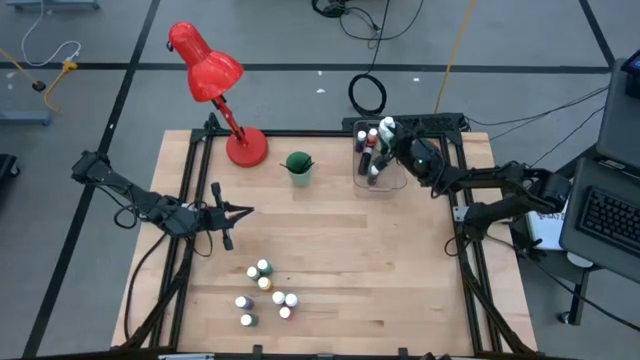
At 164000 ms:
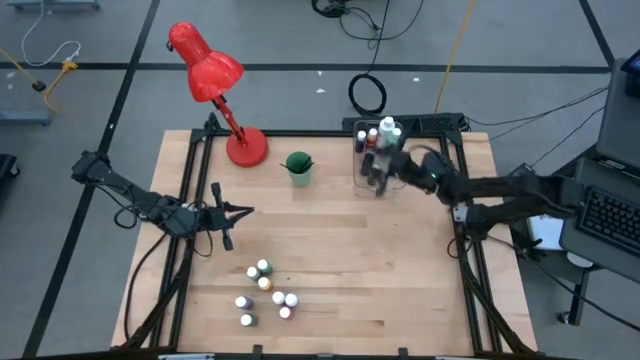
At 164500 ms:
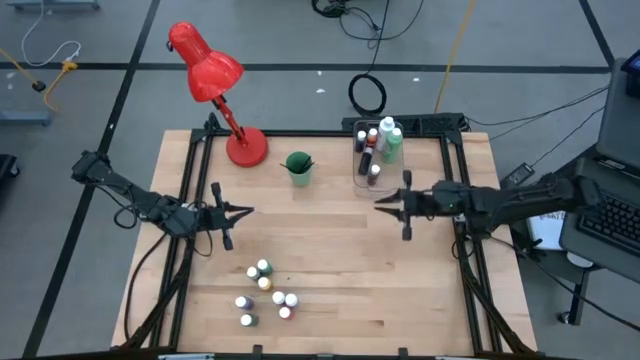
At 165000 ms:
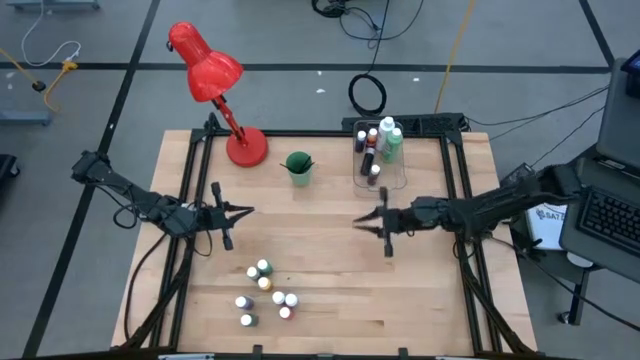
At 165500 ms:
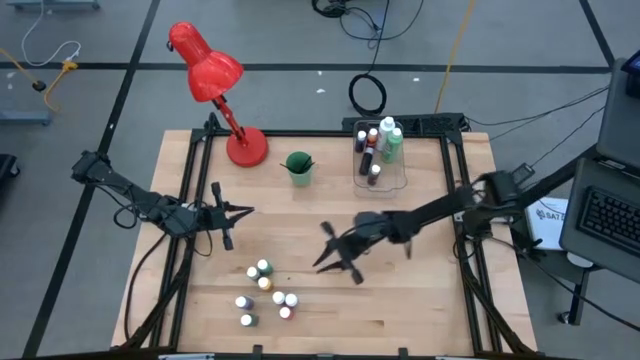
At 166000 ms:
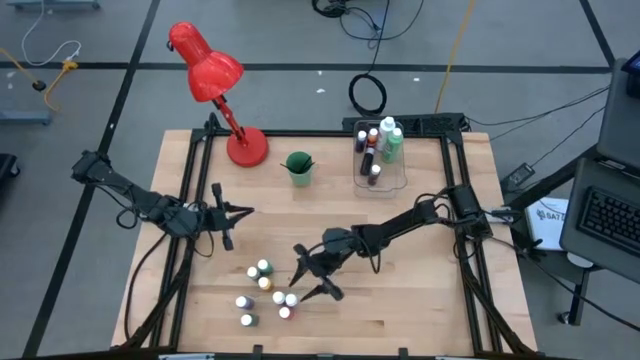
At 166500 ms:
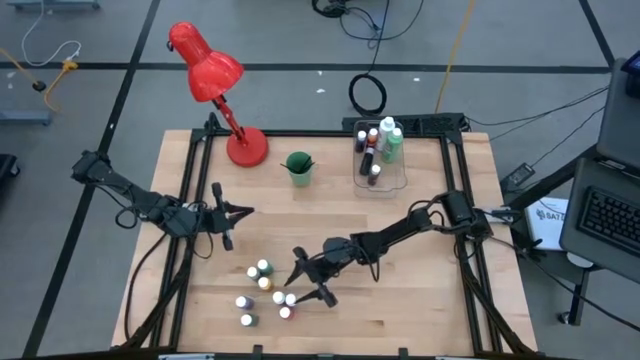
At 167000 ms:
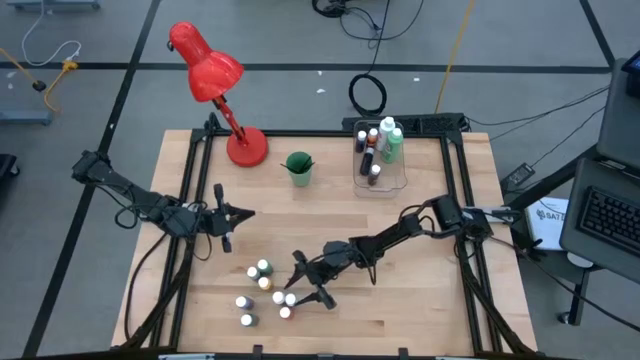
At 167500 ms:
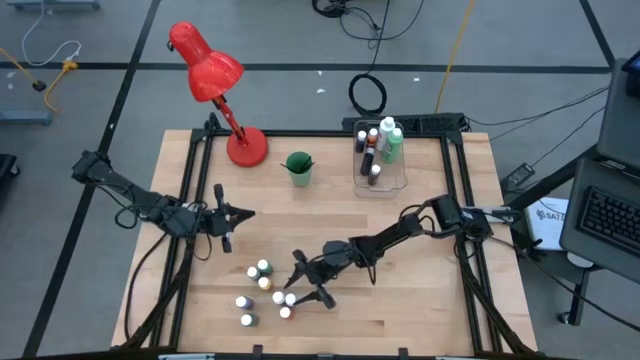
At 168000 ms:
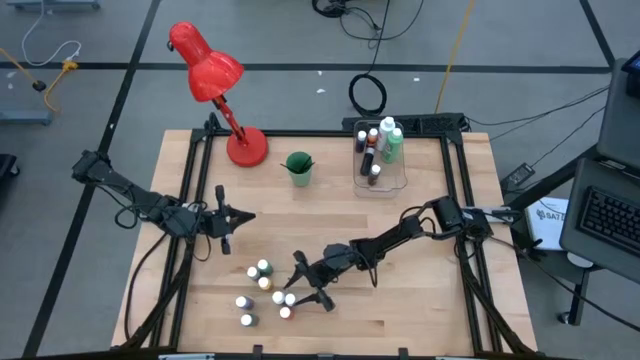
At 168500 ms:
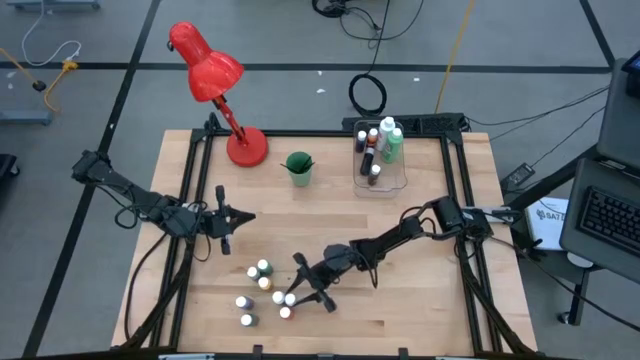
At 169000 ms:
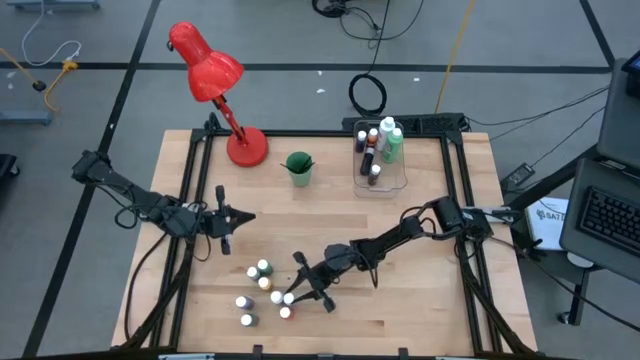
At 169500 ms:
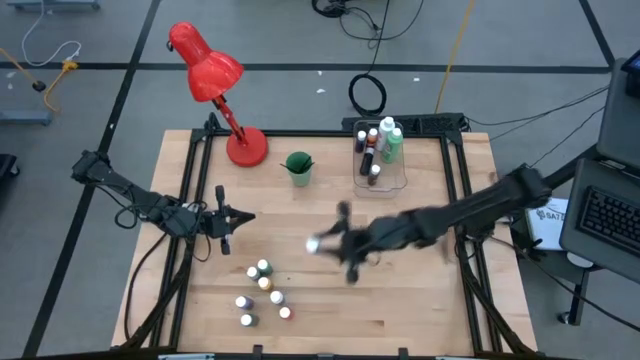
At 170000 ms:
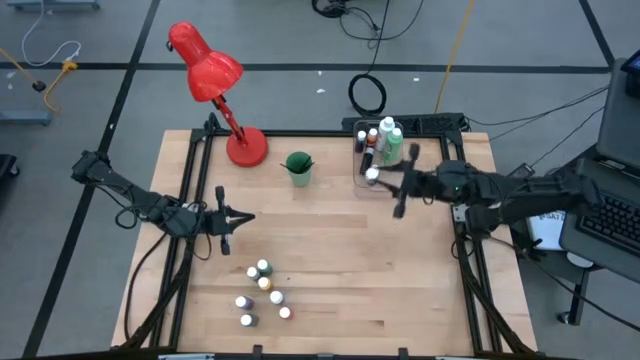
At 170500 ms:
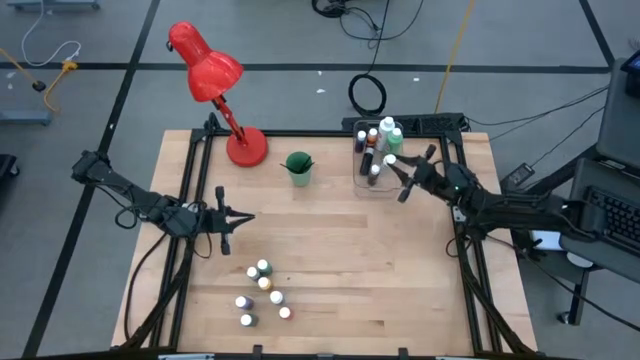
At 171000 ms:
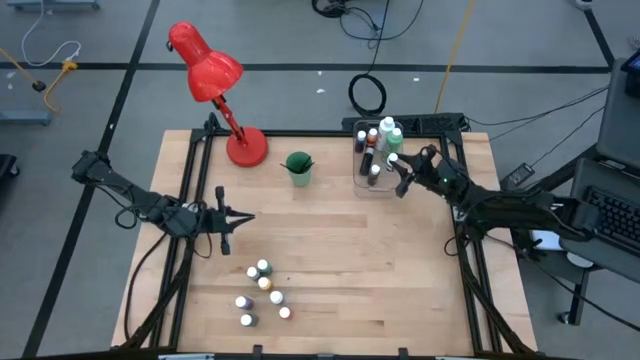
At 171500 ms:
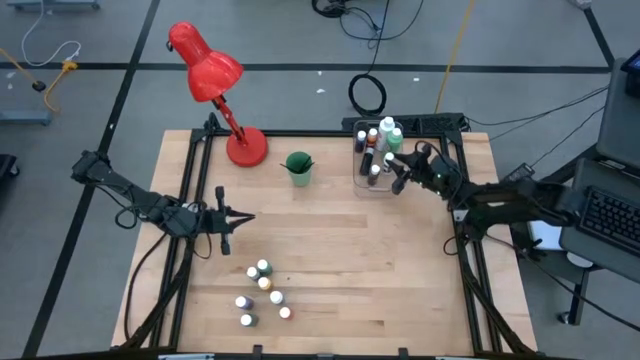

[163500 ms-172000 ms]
Task: Pick & Place Paint Supplies
Put the white pant bottle into the transparent bin

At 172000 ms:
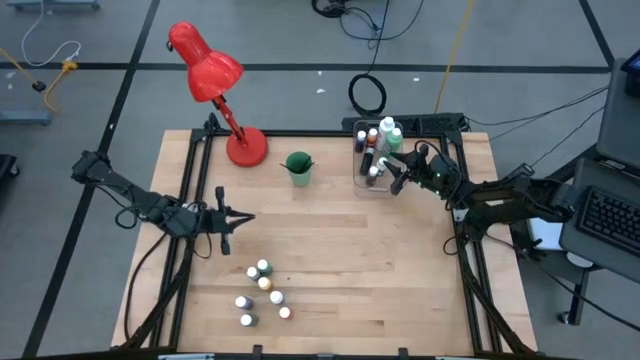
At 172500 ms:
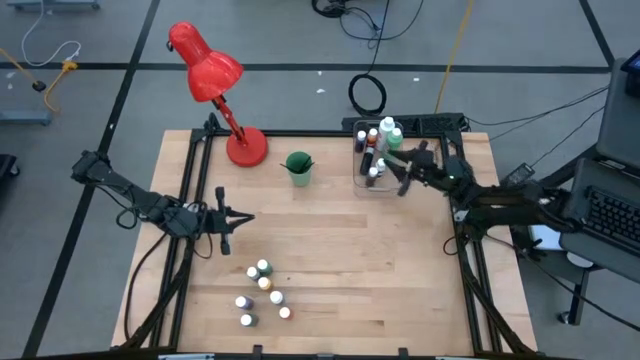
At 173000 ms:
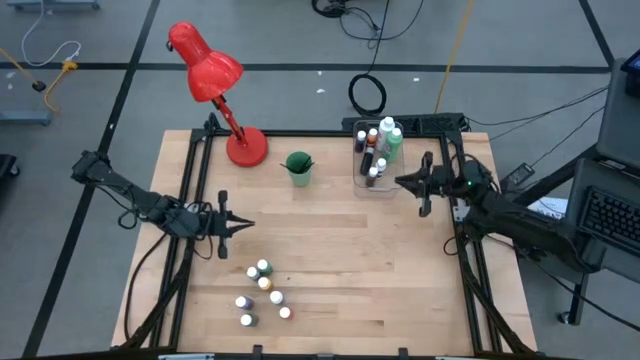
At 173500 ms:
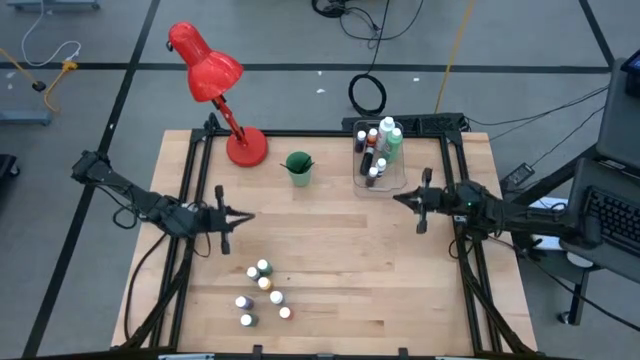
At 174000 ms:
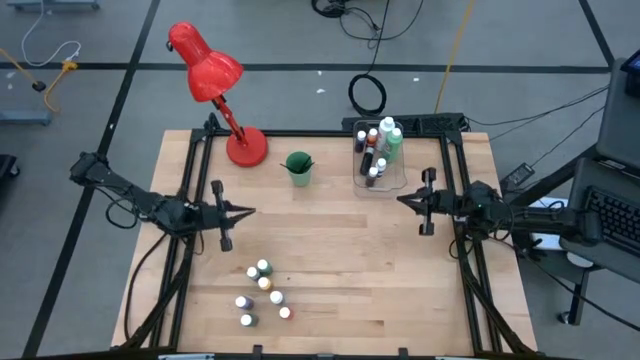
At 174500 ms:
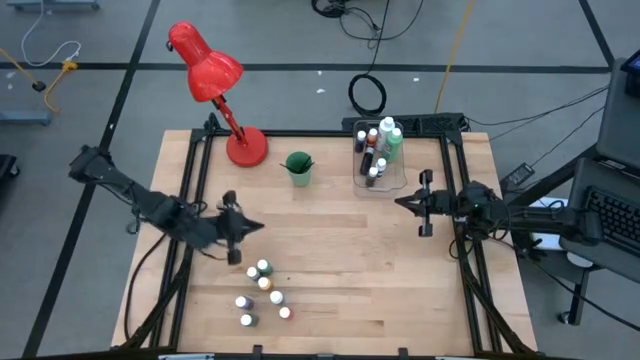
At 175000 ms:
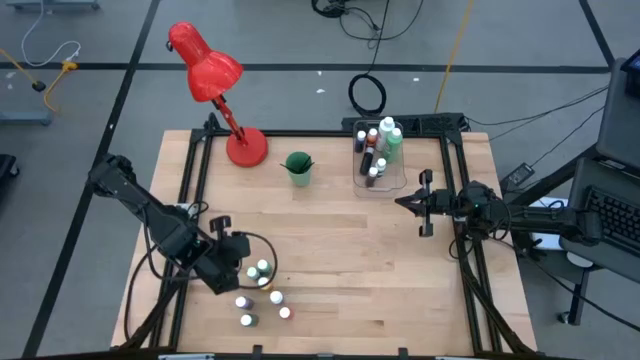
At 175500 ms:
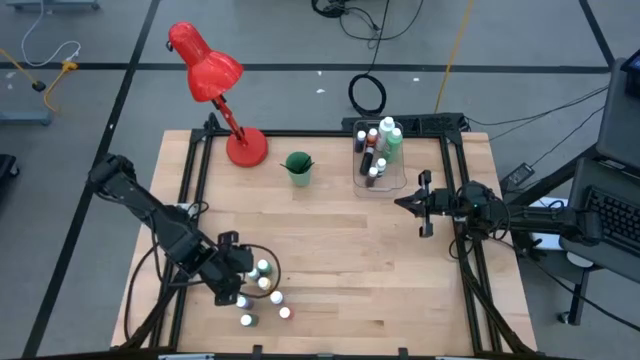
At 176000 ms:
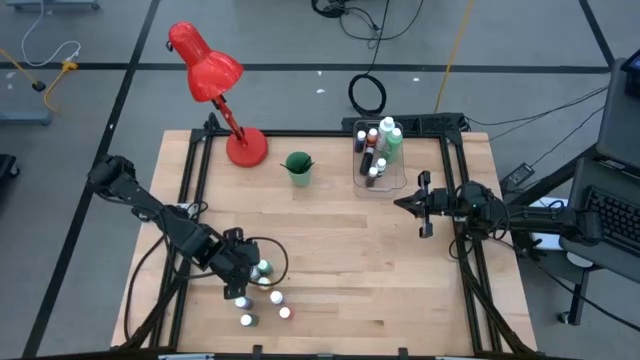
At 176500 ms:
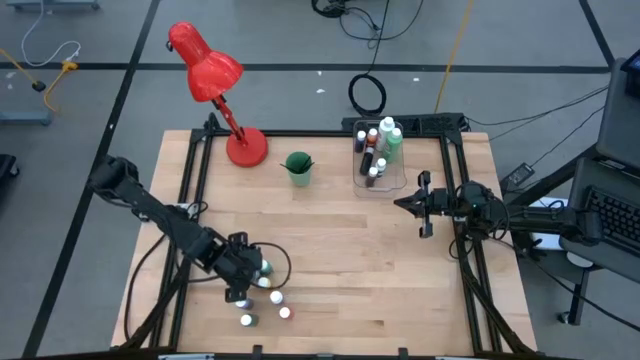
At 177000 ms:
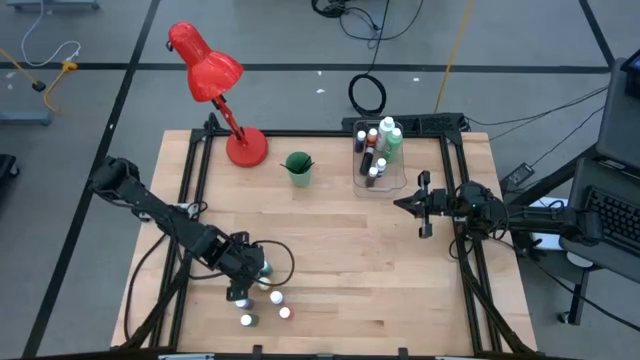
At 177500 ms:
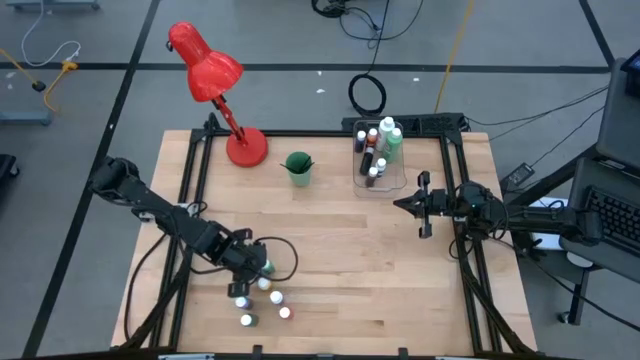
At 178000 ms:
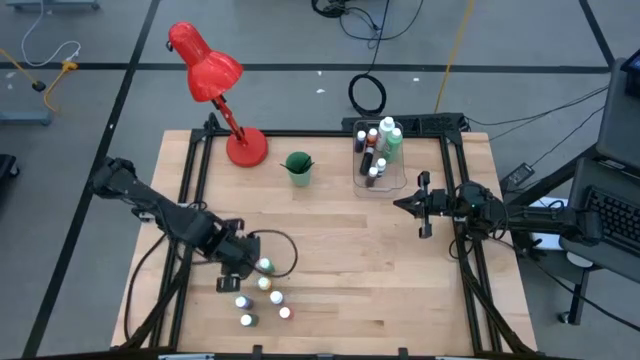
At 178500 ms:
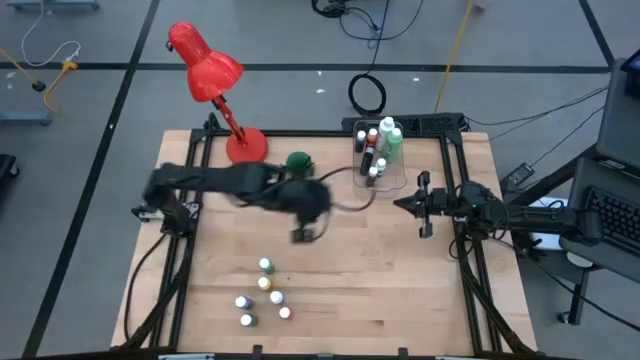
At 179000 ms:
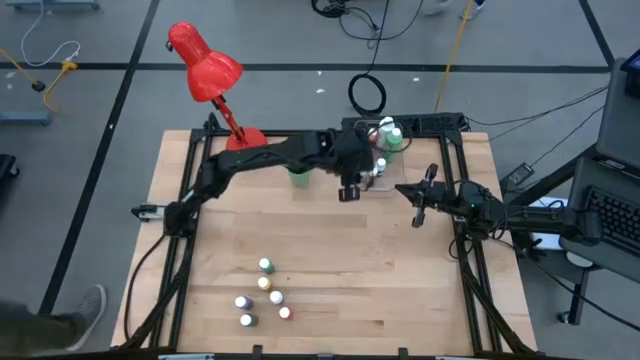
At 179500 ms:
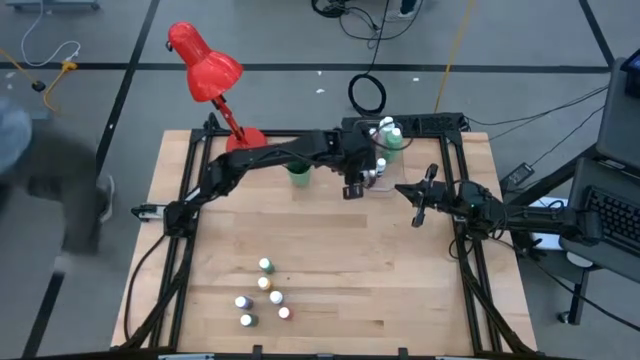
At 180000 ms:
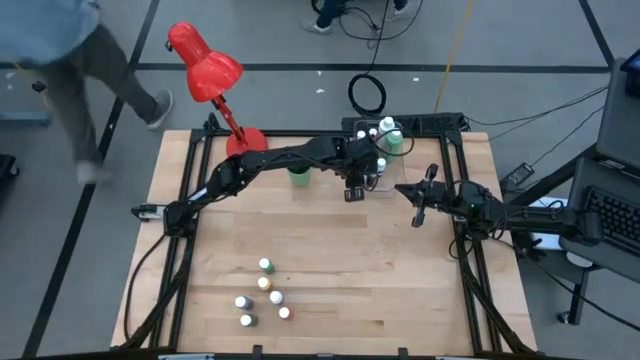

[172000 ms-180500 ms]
Put the gray paint bottle into the transparent bin

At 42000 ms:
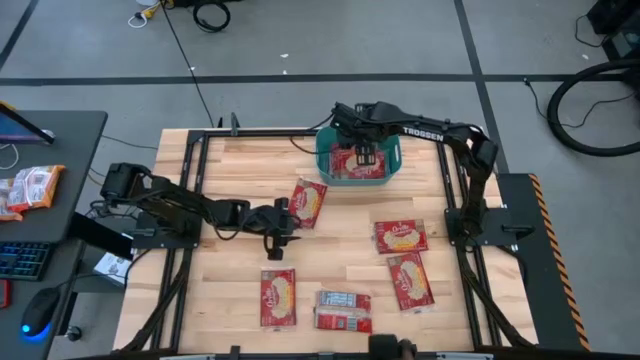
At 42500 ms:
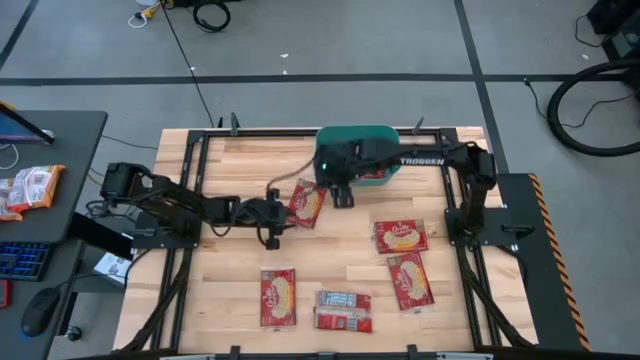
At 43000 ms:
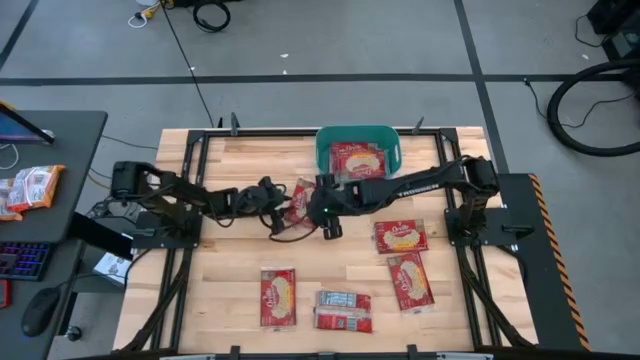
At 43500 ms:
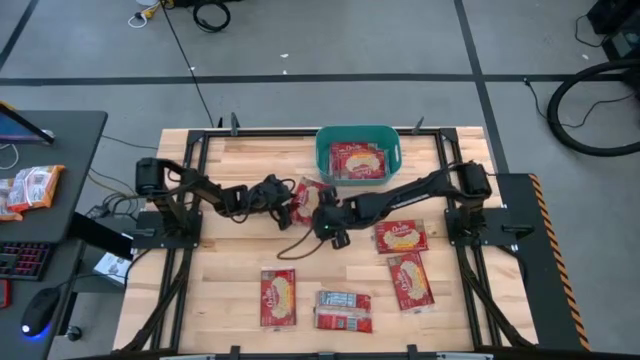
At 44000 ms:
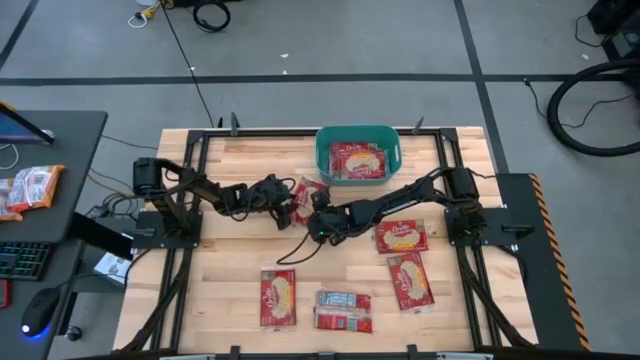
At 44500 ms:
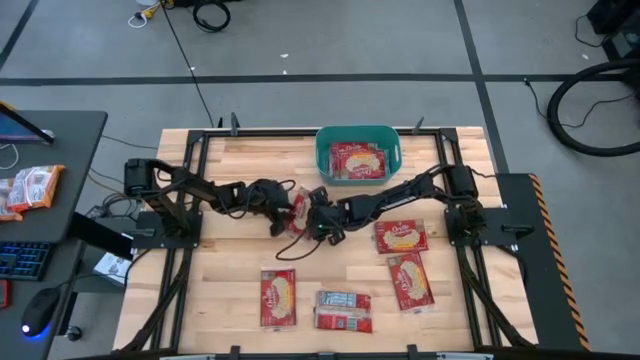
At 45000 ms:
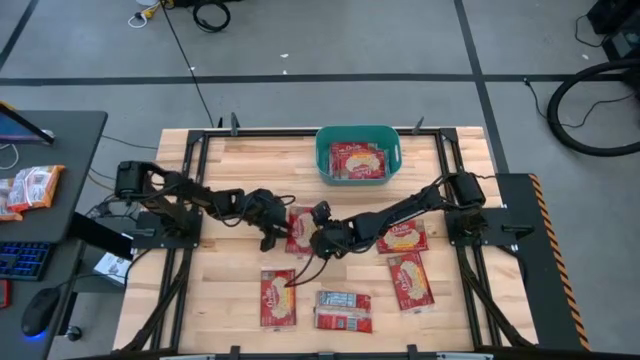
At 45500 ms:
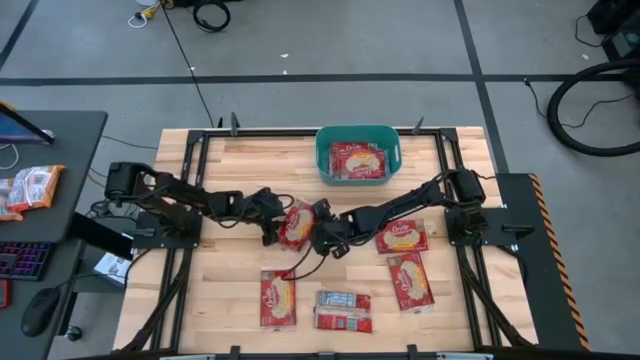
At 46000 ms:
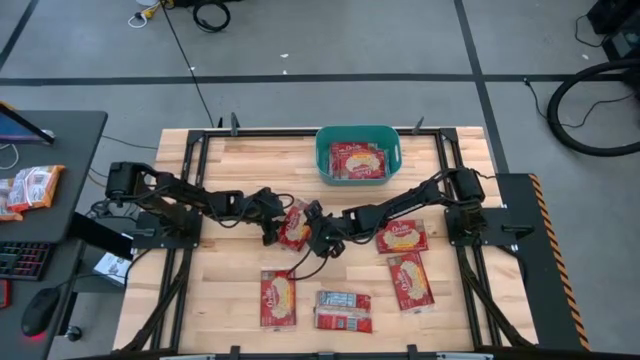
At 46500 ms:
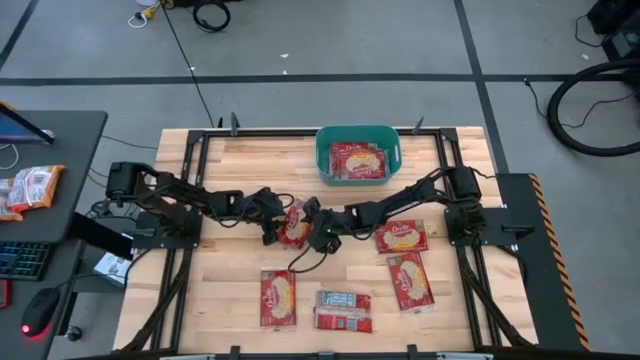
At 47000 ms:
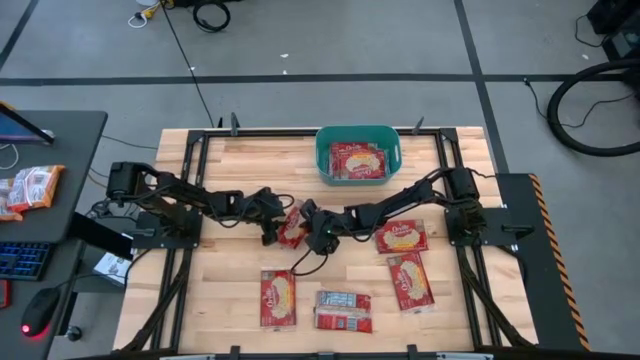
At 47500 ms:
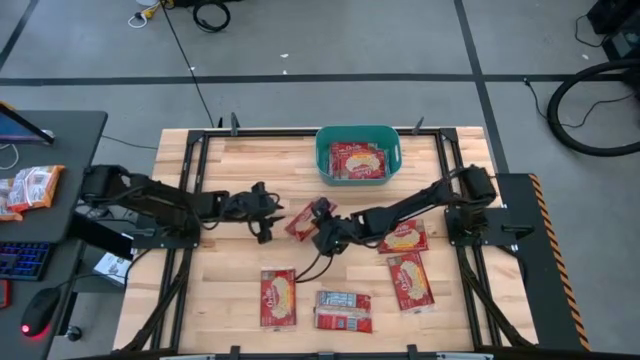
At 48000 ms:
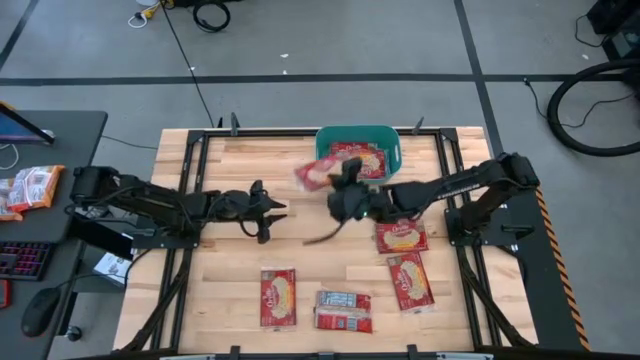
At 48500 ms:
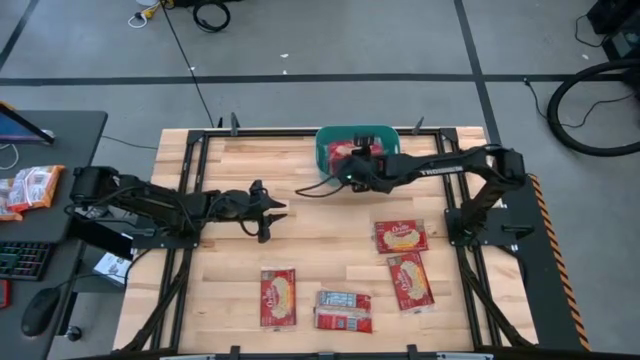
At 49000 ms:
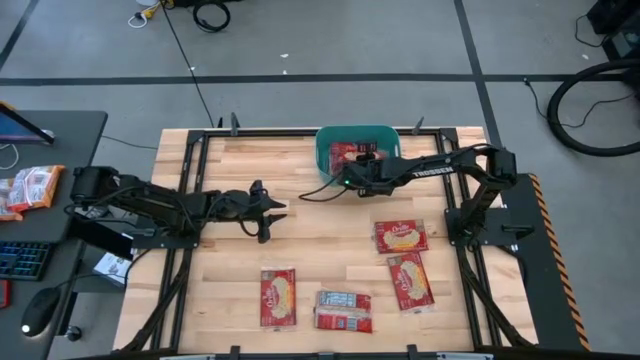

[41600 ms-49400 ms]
Task: Sort popcorn bags into baskets
Put the red popcorn bag into the blue bin
